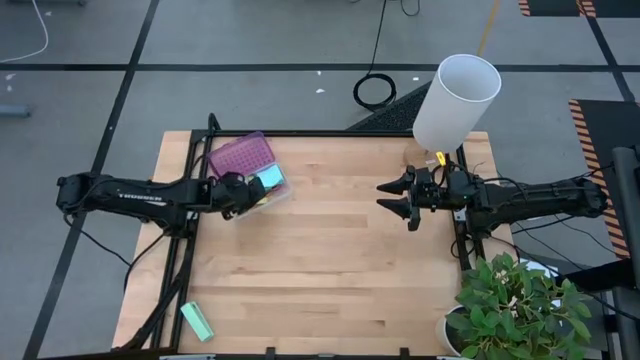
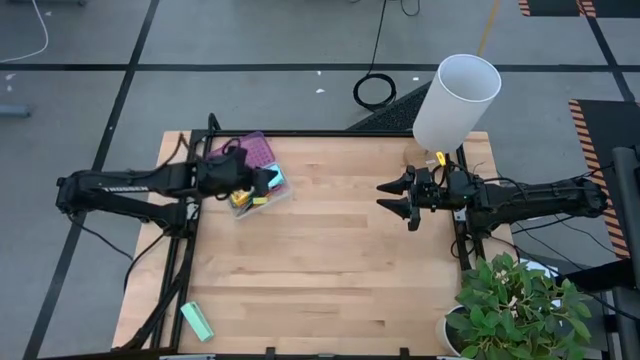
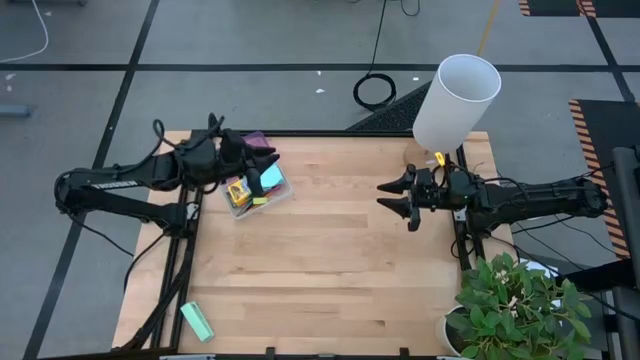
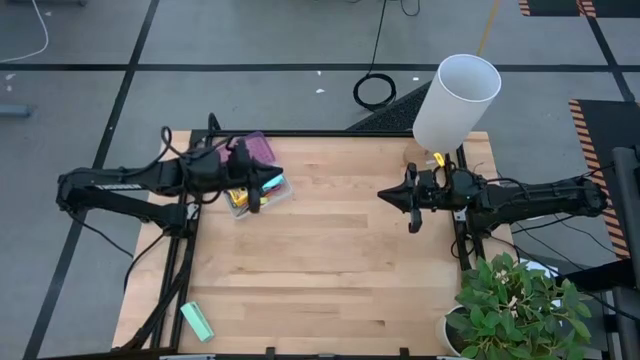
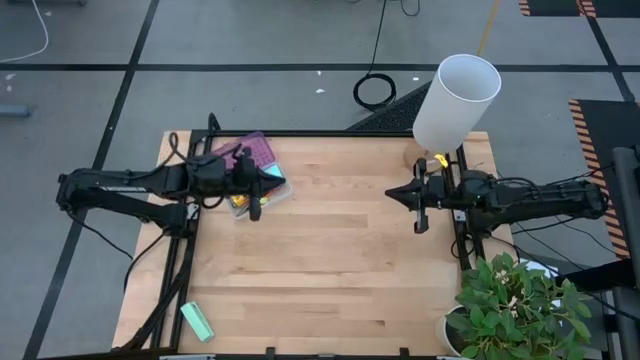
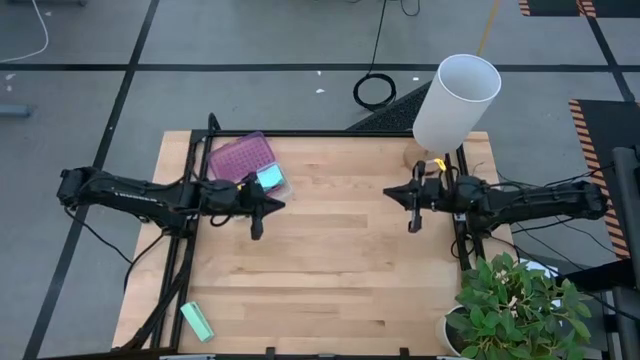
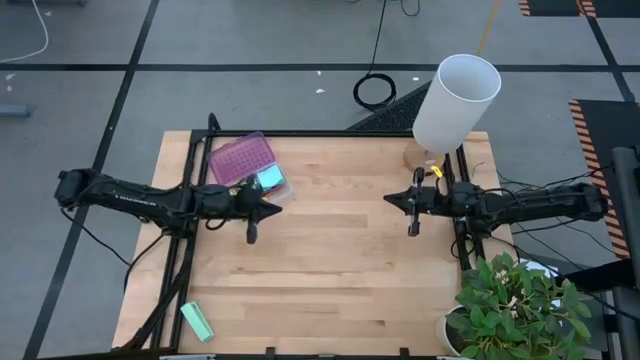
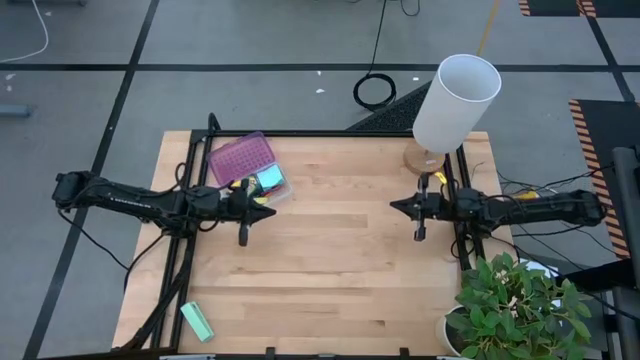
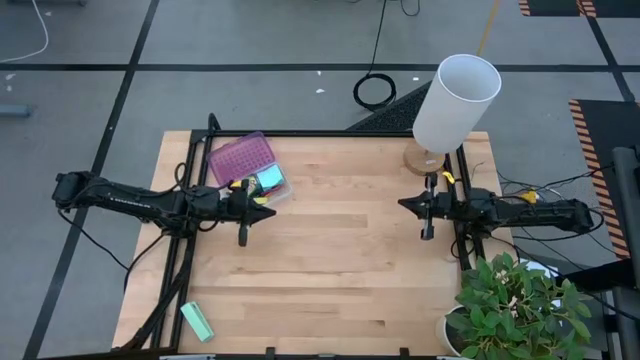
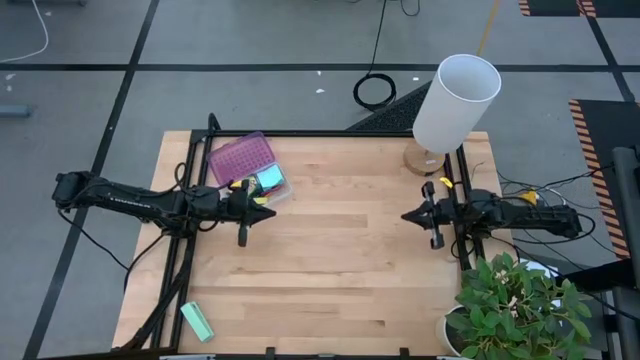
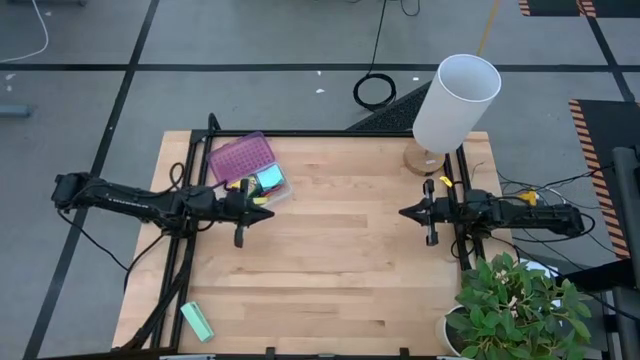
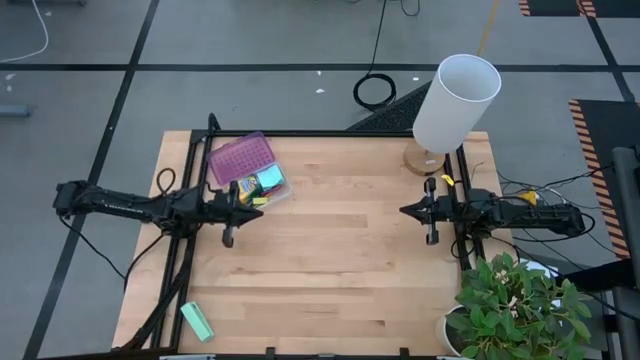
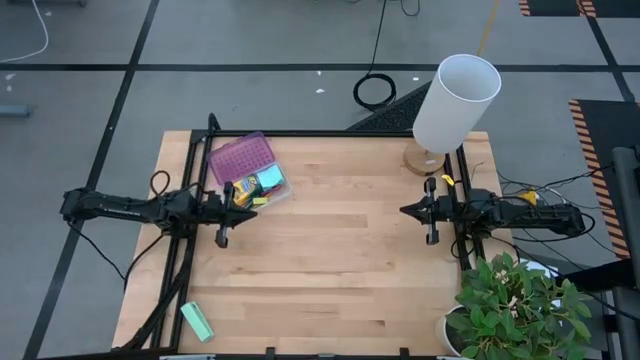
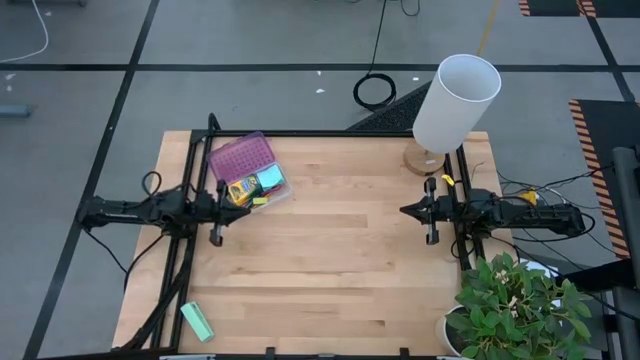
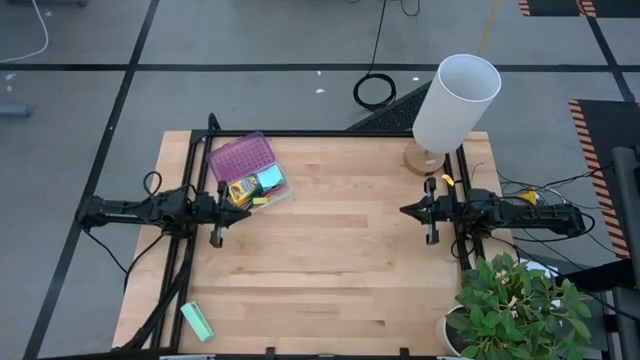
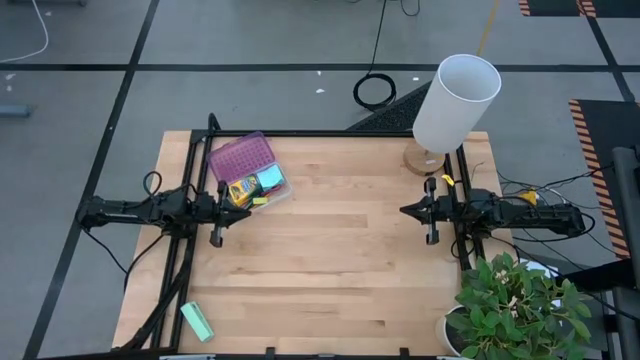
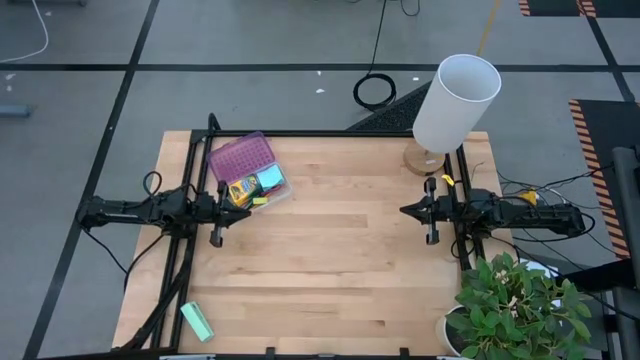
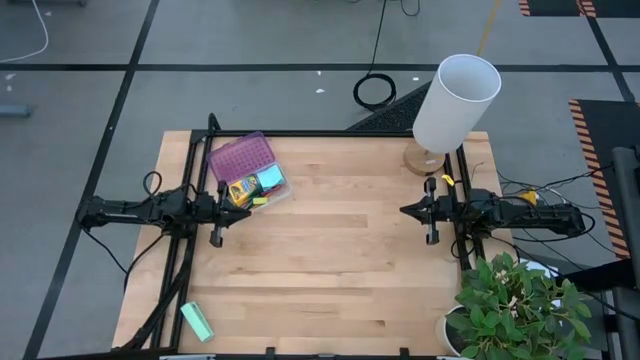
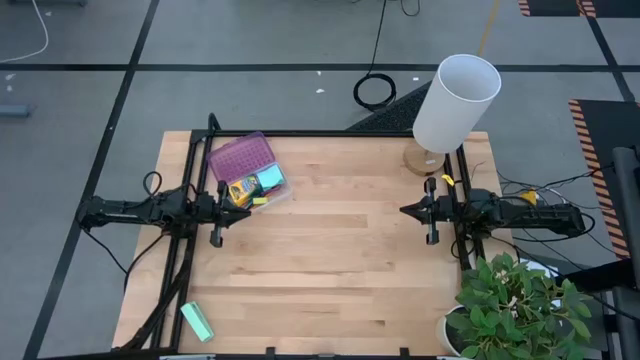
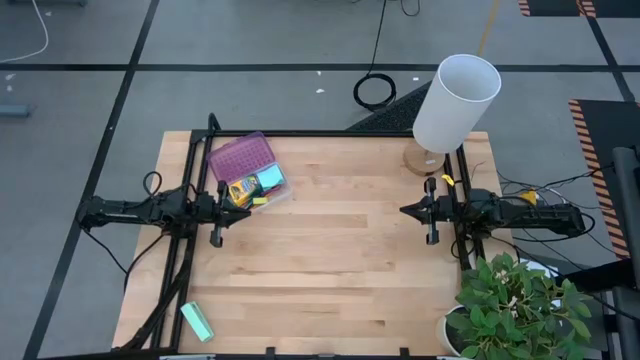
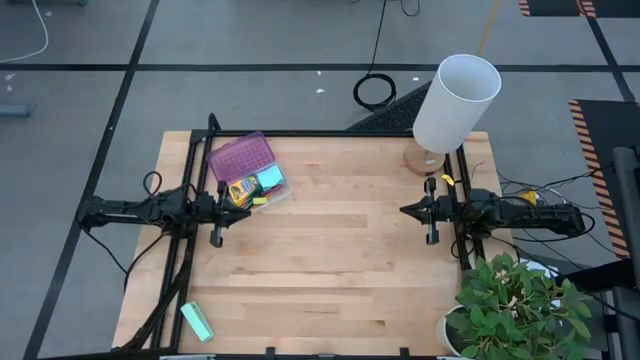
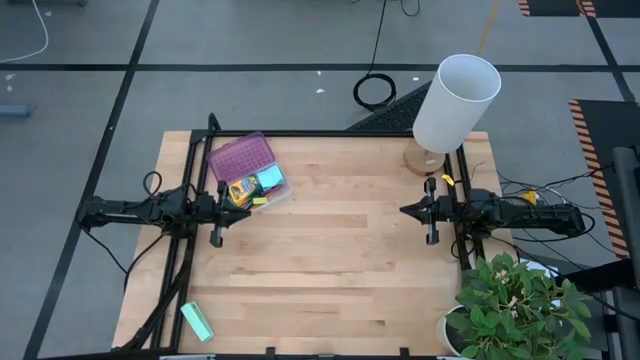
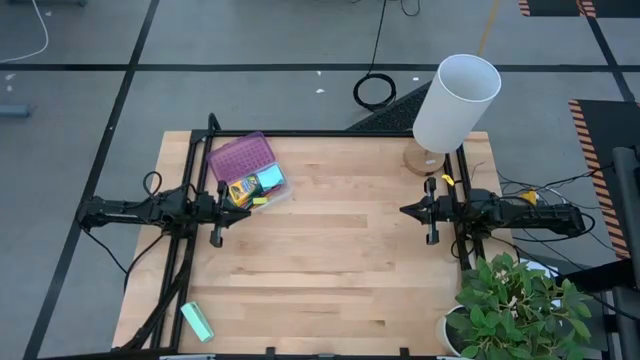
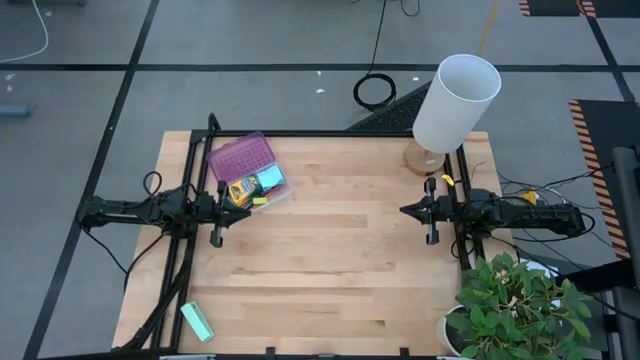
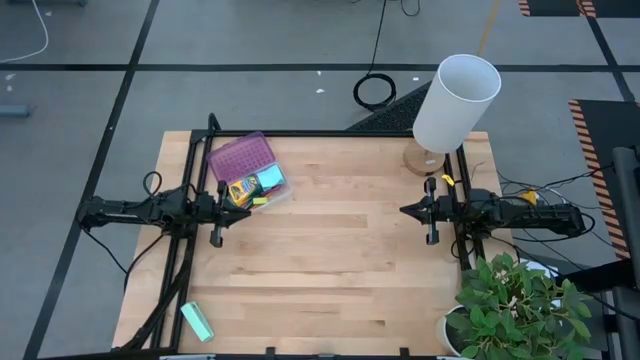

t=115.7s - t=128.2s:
Task: Pack school essentials
Return to Home Position

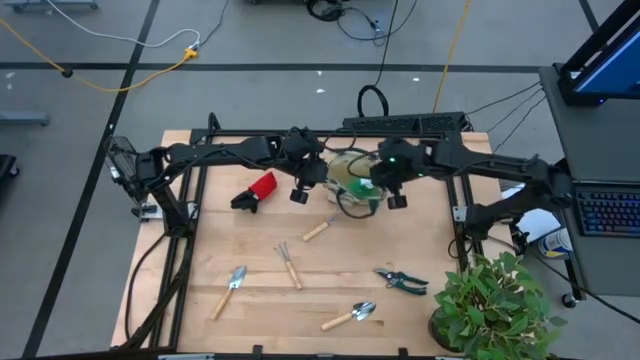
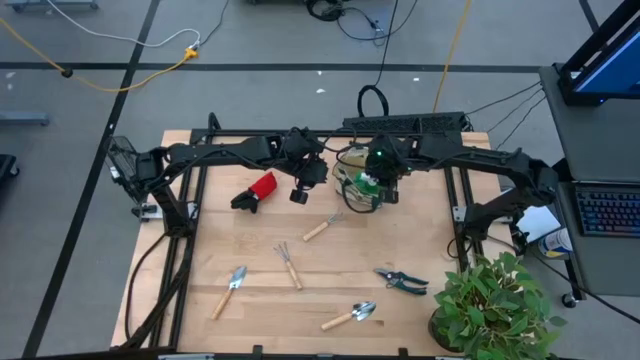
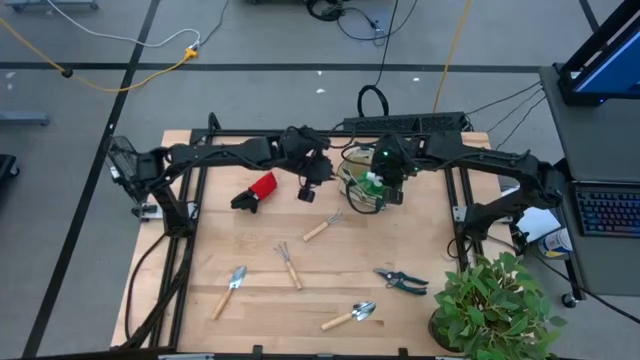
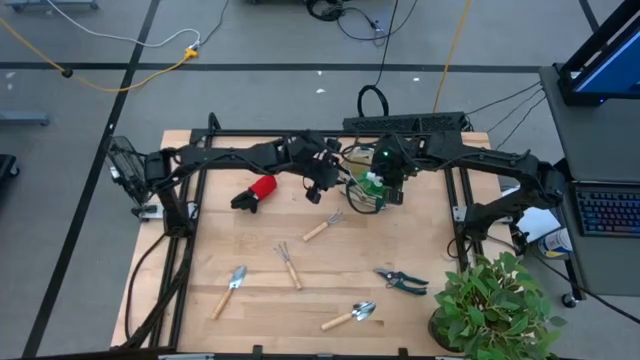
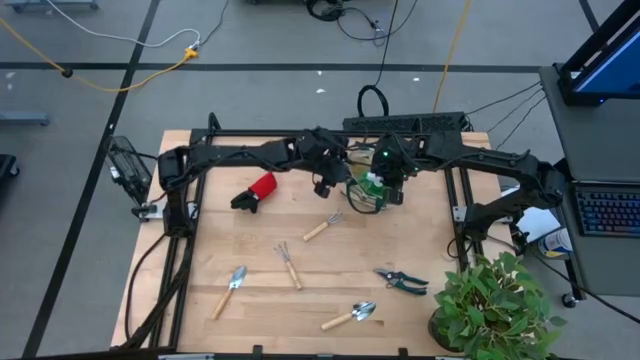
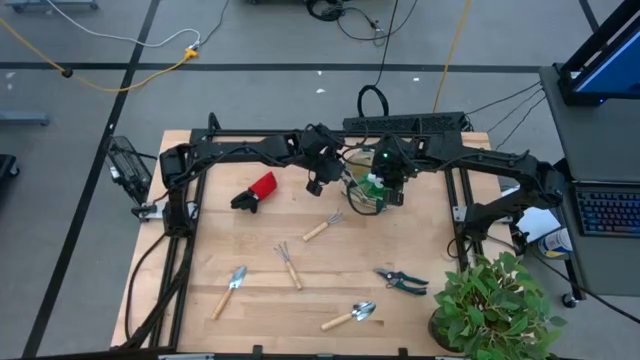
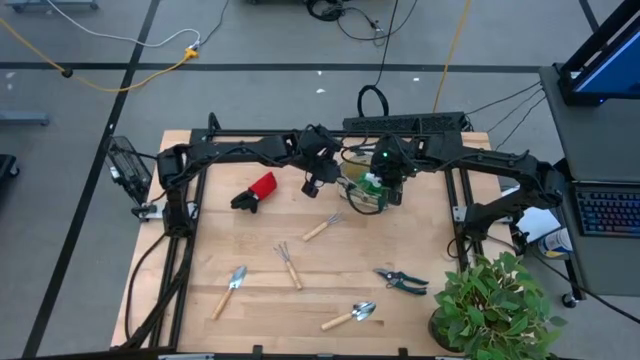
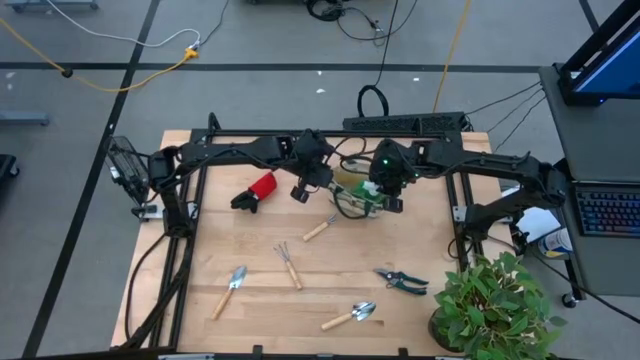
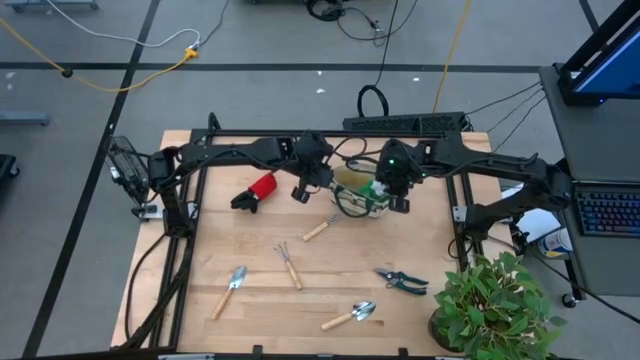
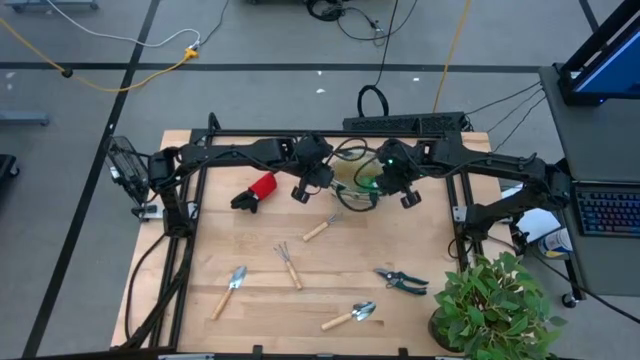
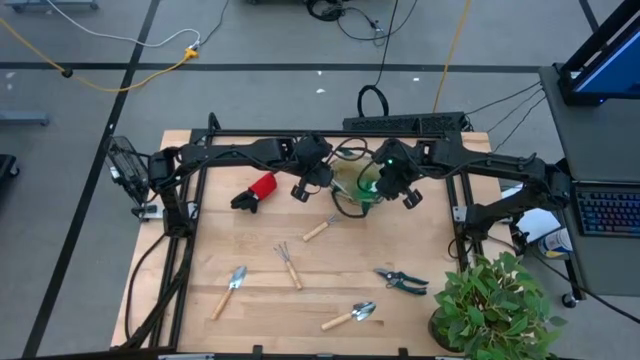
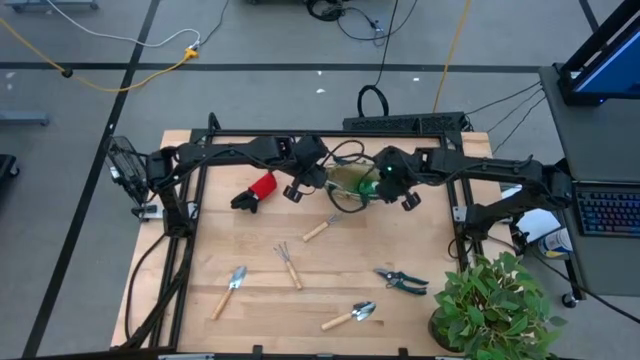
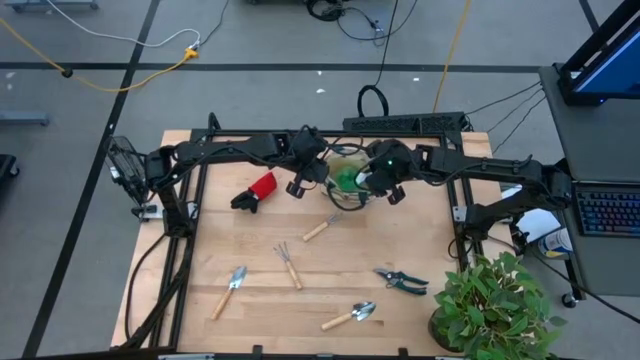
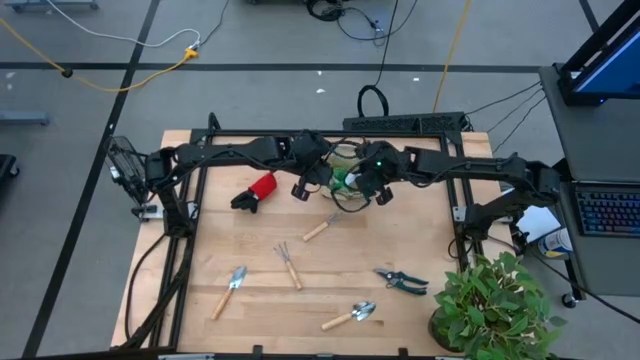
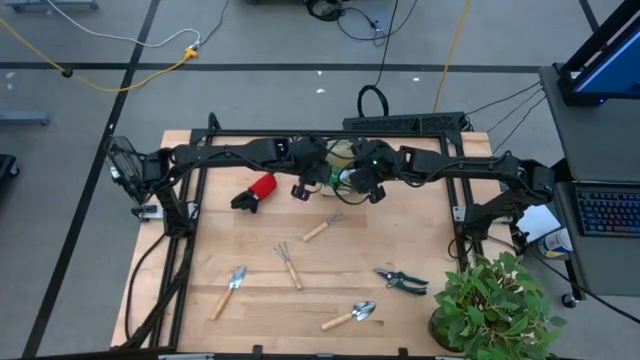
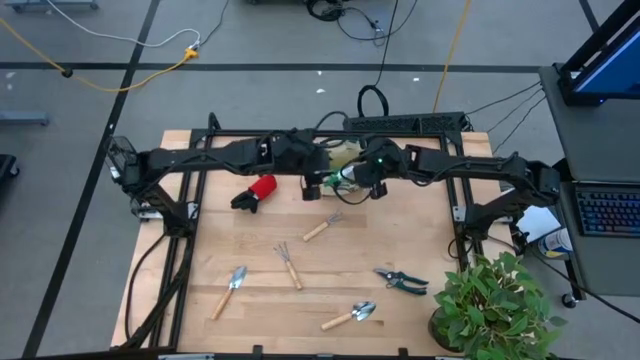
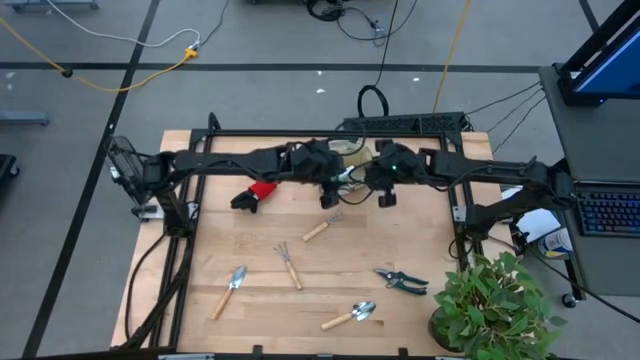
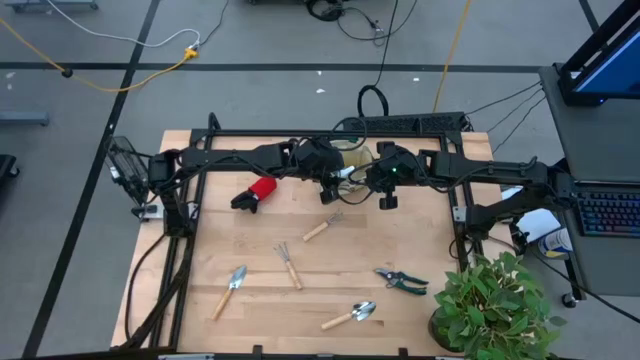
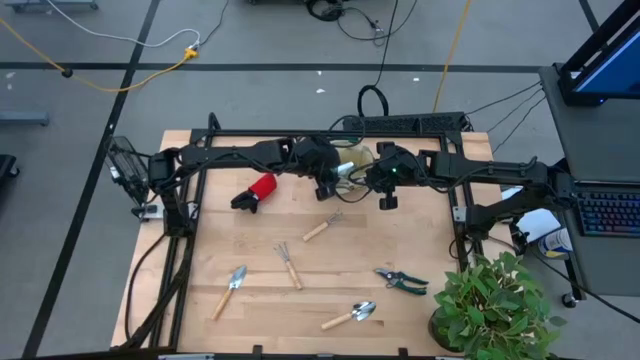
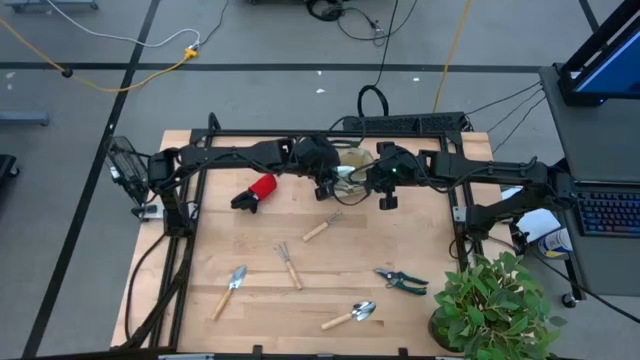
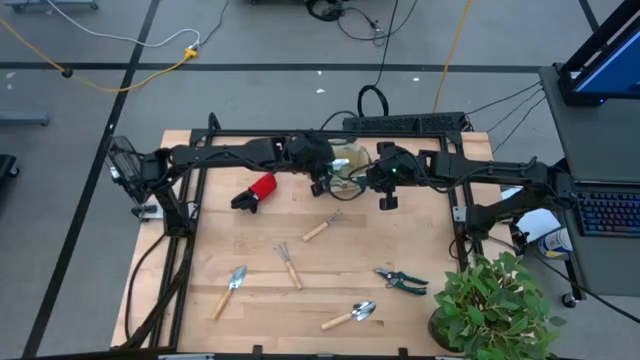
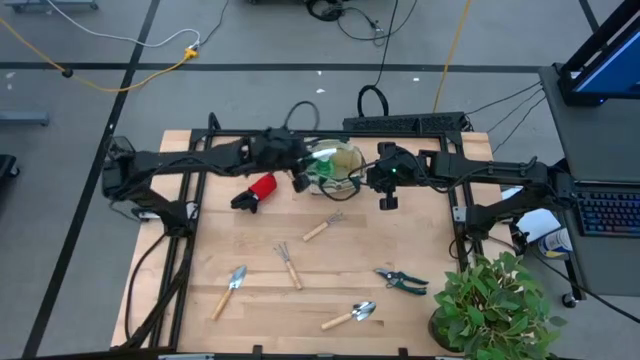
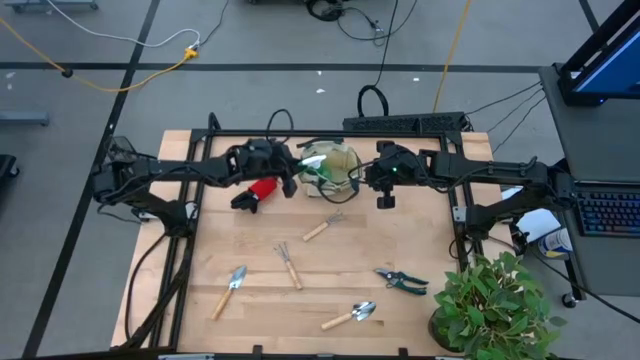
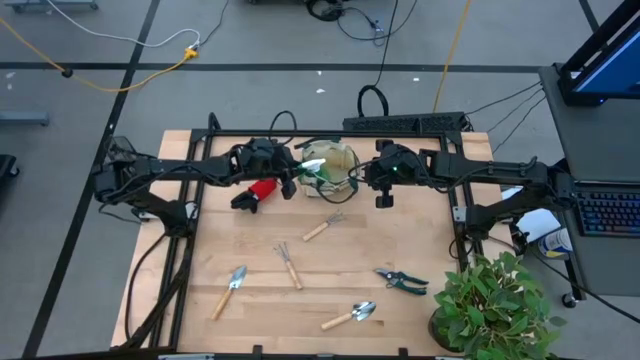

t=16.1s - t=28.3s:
Task: Pick & Place Garden tools in Gardening bag
Put the green spray bottle into the gardening bag
